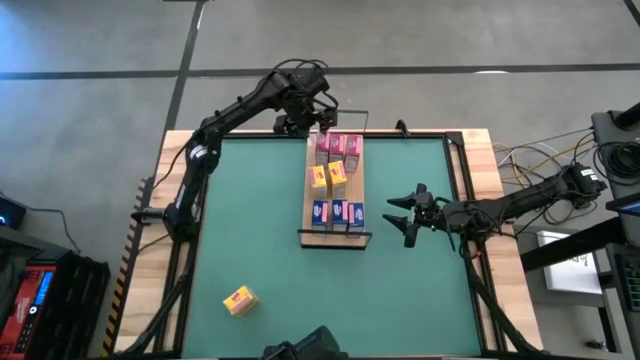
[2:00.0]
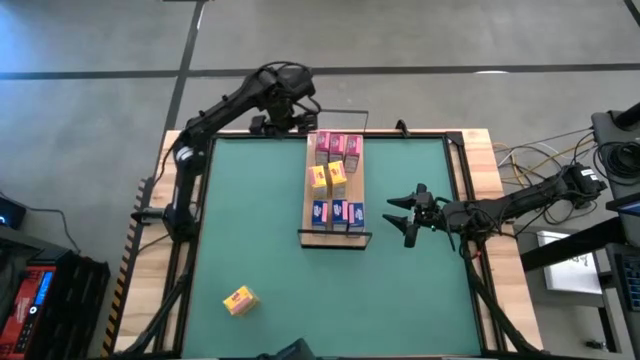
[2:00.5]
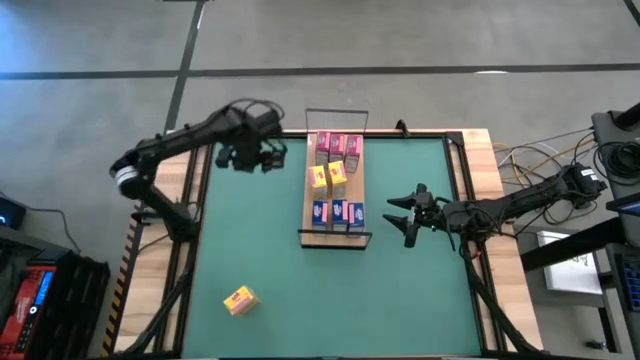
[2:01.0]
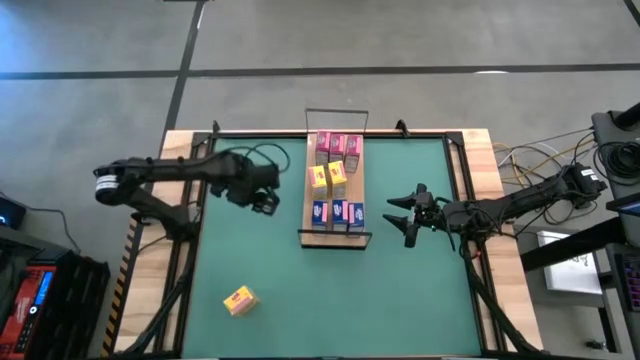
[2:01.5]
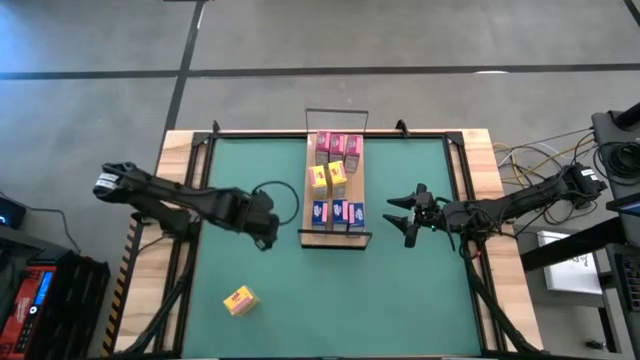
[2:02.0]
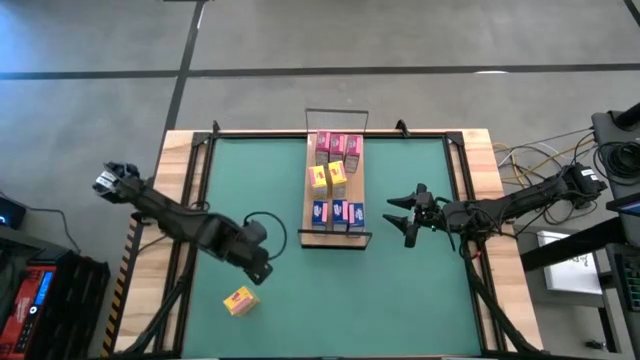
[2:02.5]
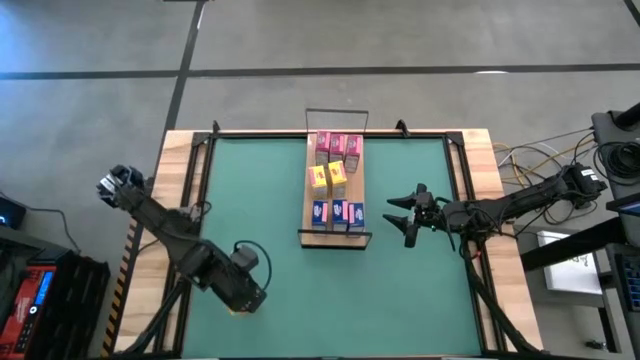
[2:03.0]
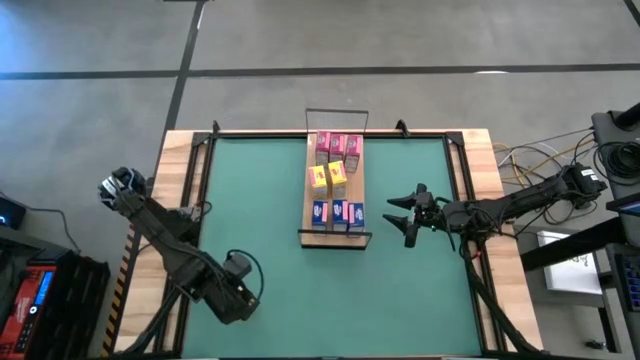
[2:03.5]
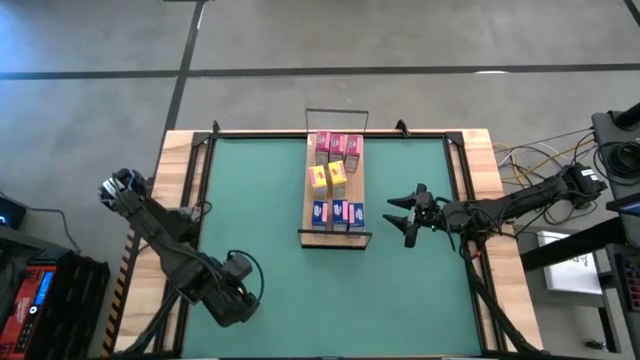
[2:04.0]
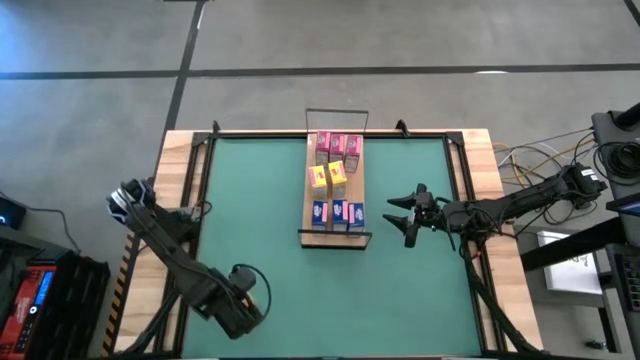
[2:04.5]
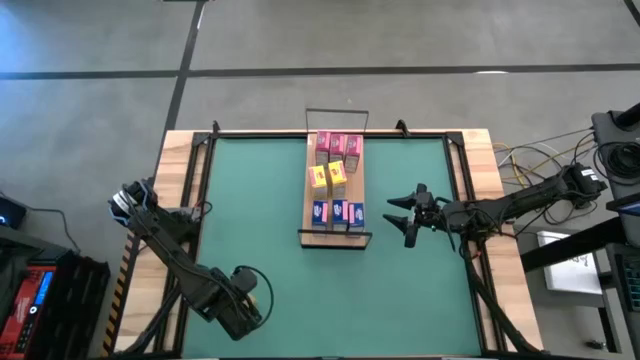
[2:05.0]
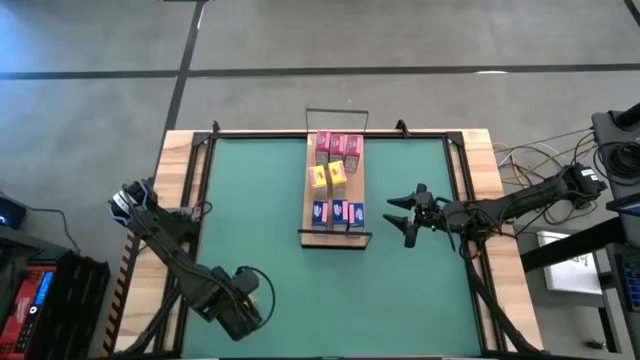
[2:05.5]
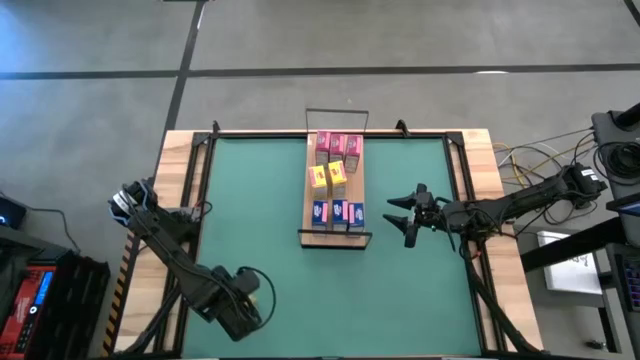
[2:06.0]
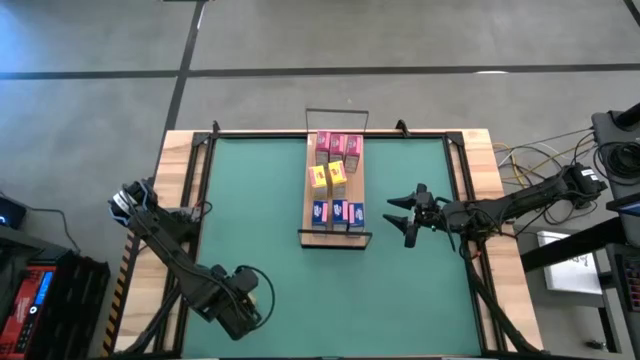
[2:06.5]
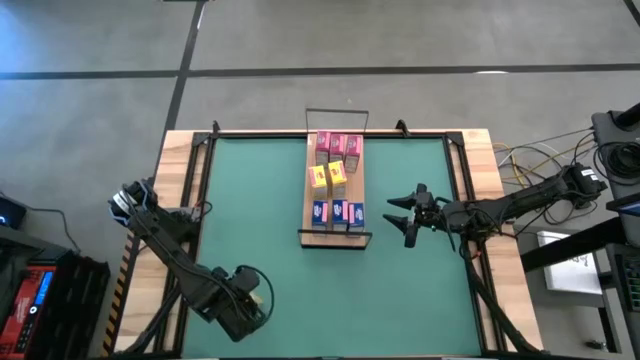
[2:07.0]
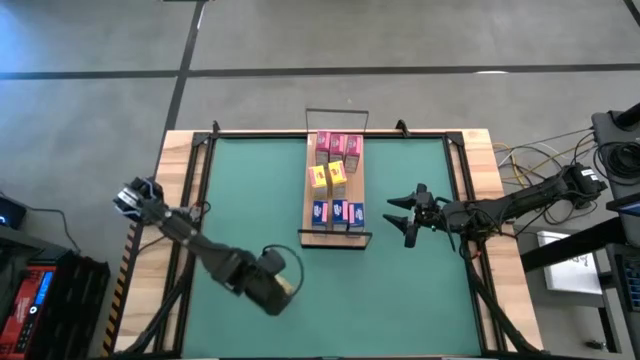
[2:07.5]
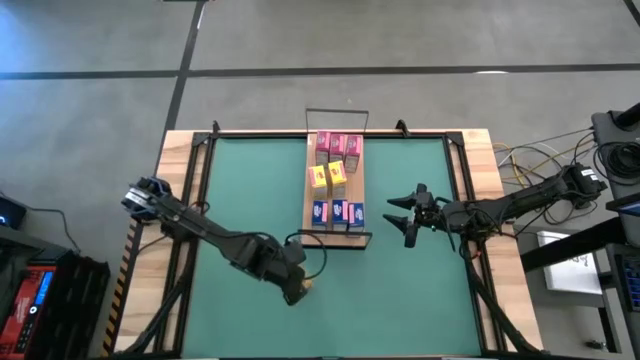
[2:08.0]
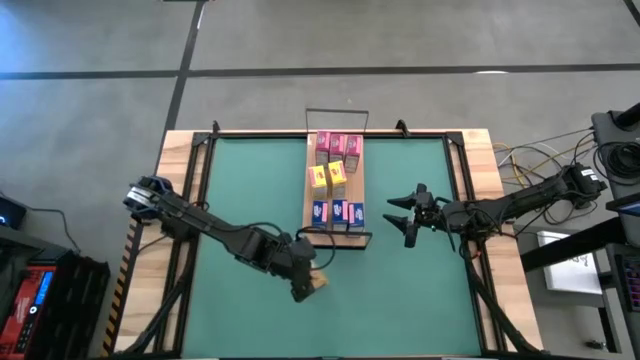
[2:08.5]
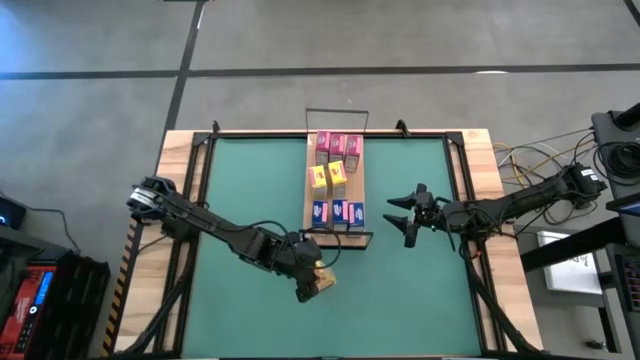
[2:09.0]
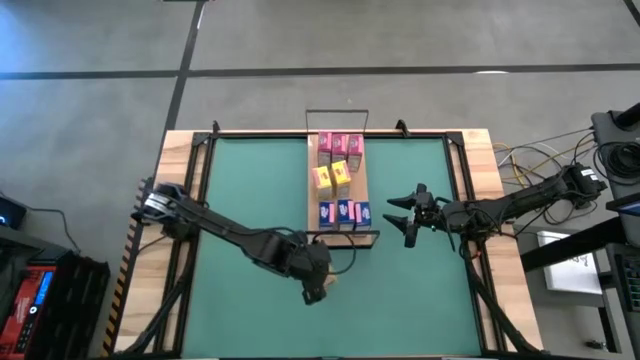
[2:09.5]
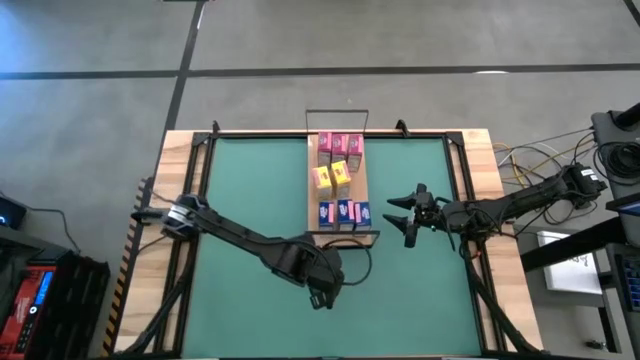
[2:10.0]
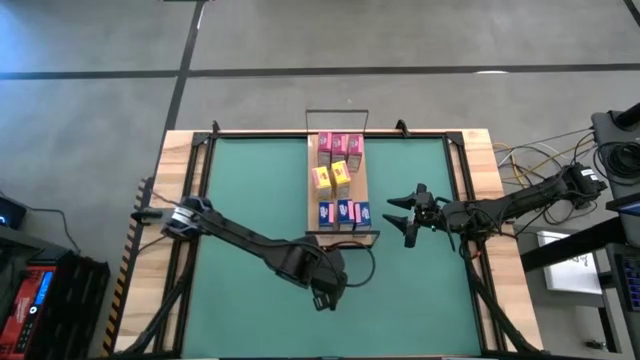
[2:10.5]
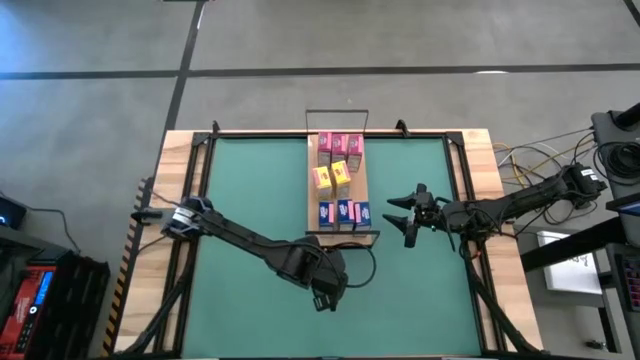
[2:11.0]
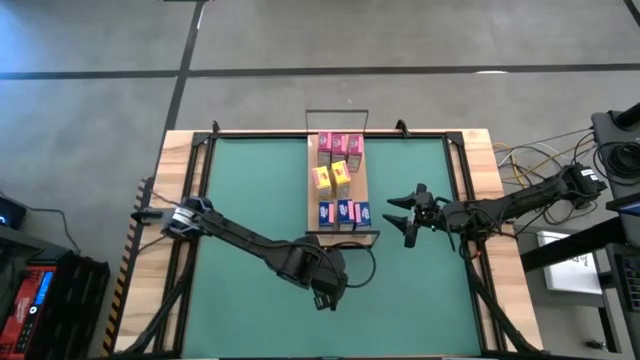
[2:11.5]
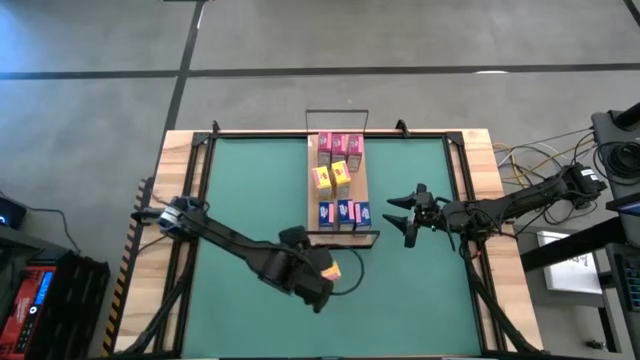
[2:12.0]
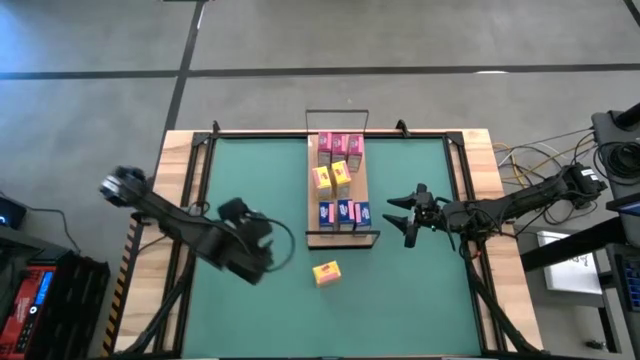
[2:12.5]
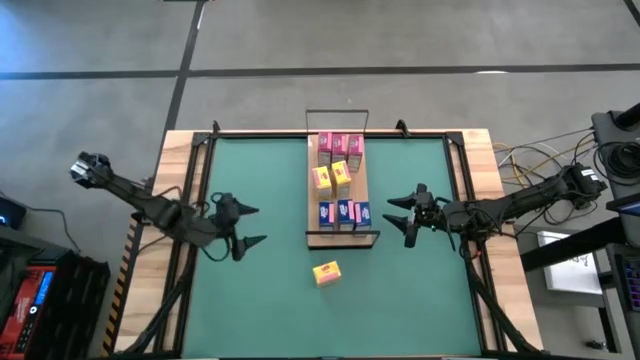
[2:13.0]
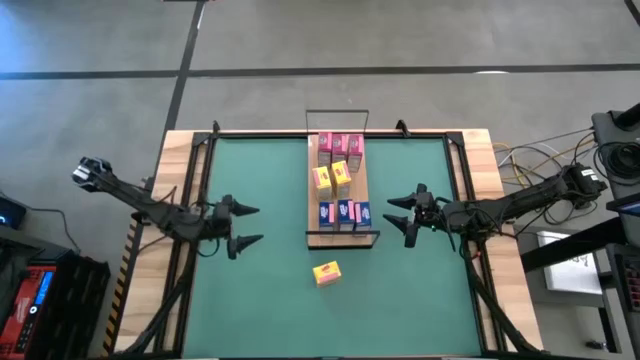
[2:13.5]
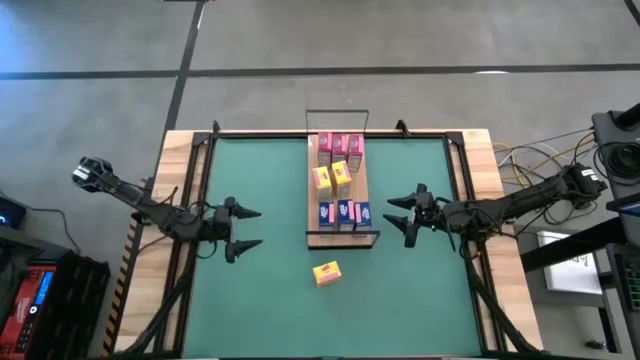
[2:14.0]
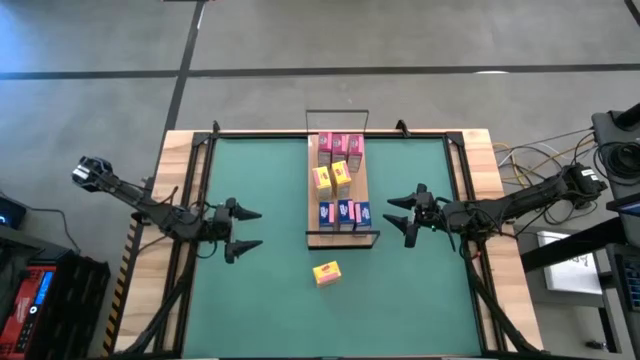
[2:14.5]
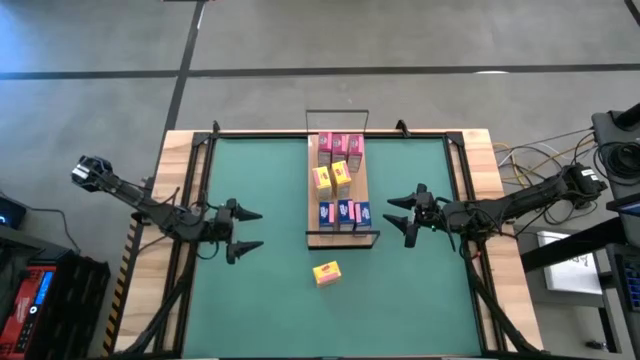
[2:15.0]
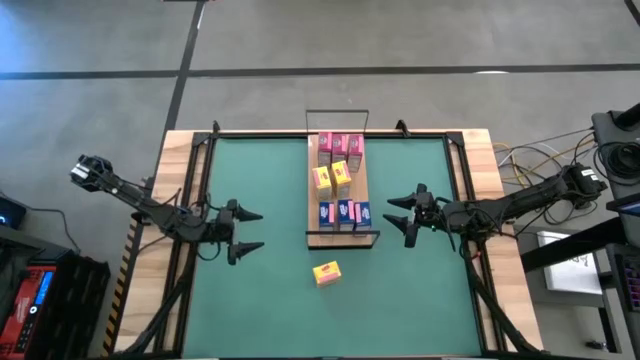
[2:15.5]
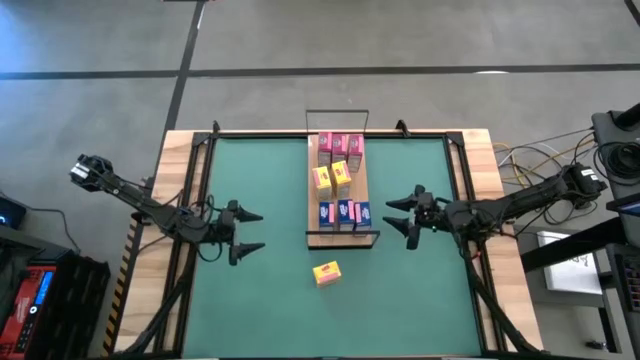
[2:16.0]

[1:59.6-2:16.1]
Task: Stack cereal on shelf
Put the yellow cereal box on the shelf

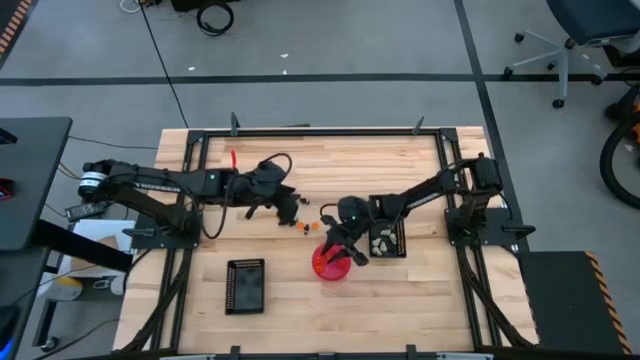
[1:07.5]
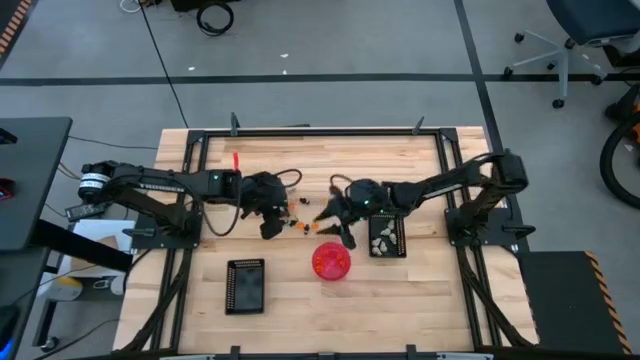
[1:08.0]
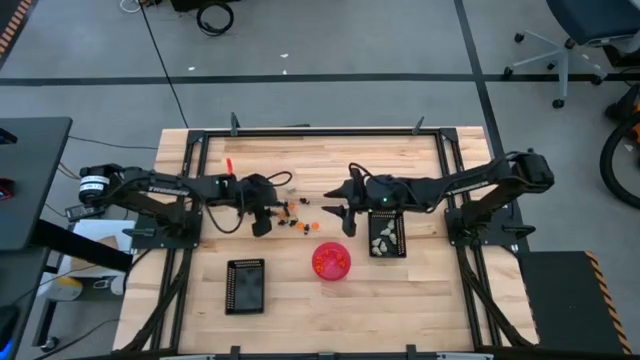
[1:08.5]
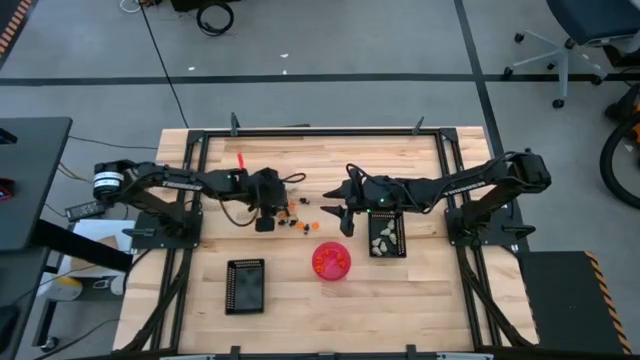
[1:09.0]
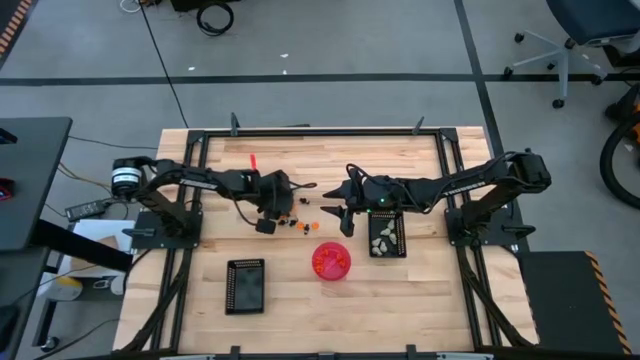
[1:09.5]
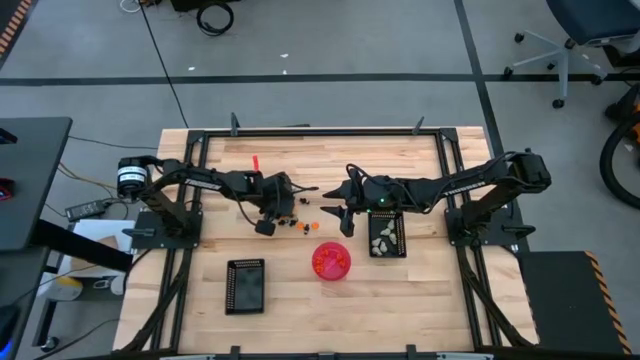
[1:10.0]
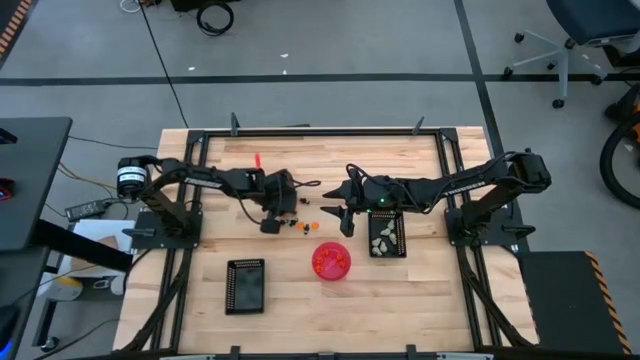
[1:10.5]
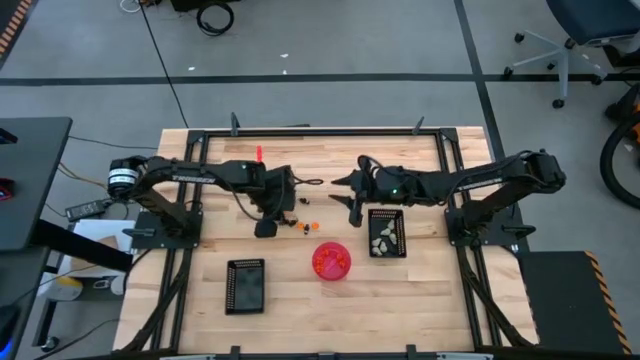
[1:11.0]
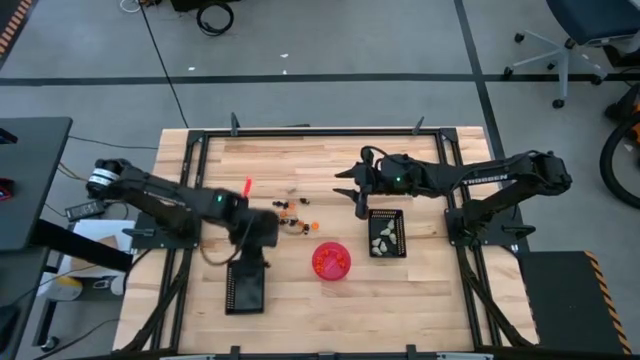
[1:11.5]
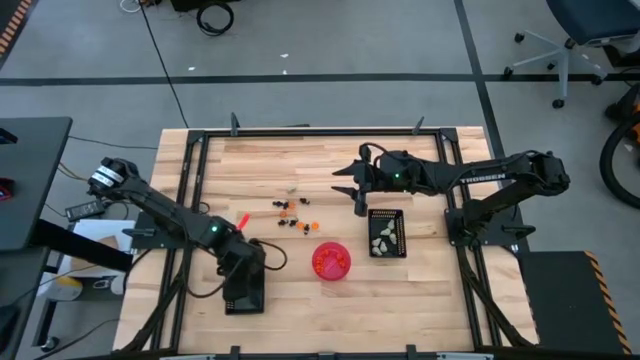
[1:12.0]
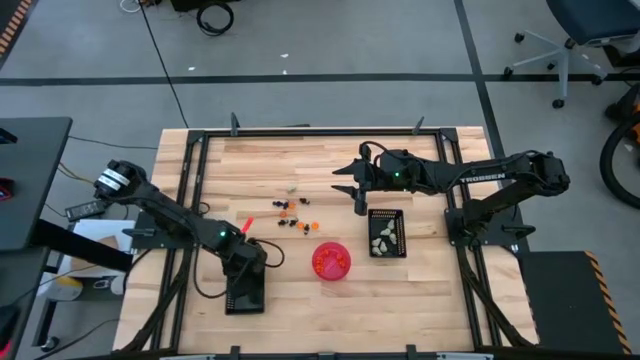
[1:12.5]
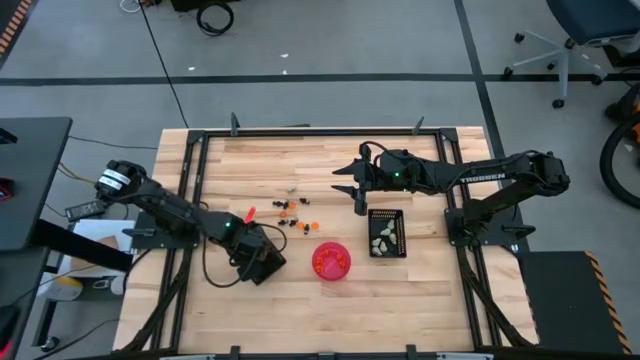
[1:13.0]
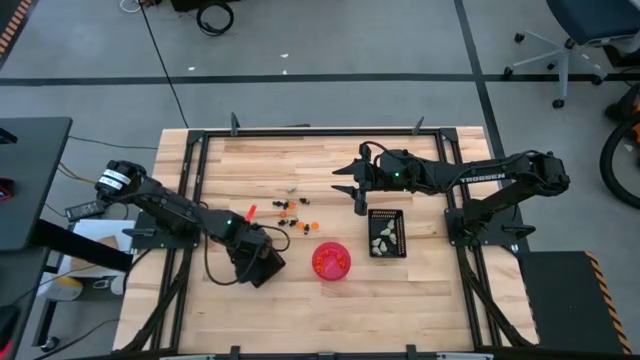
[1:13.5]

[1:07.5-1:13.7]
Task: Sort Halloween decoration
Put the black skeleton toy into the bottom black bin
